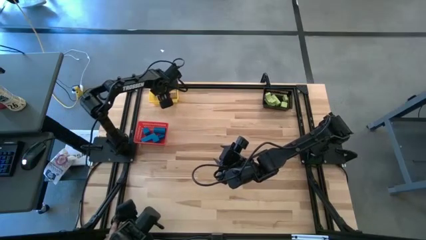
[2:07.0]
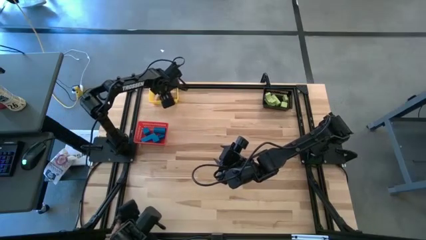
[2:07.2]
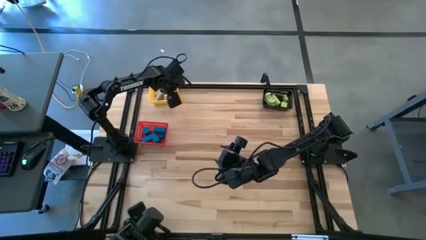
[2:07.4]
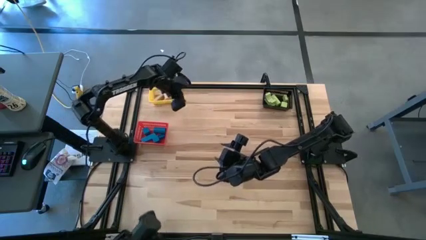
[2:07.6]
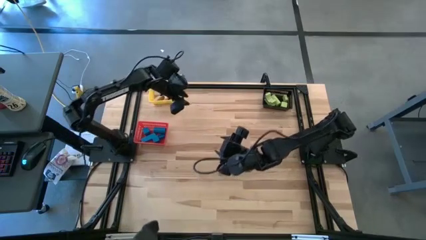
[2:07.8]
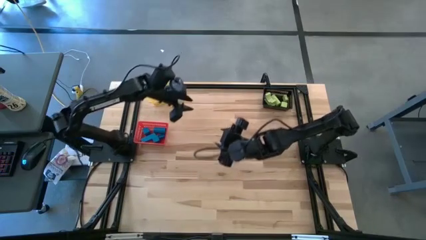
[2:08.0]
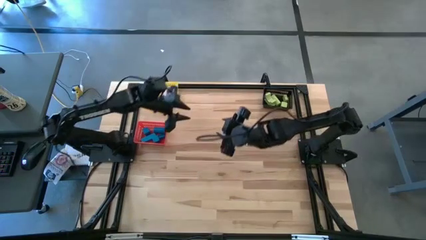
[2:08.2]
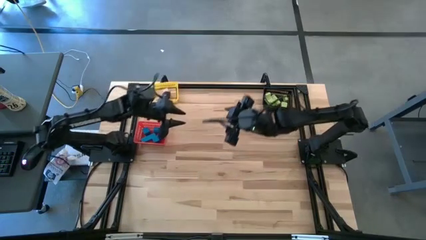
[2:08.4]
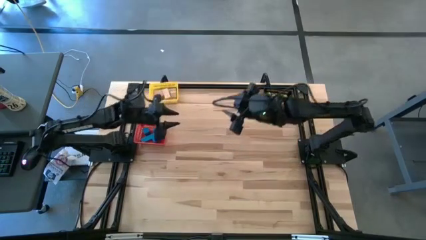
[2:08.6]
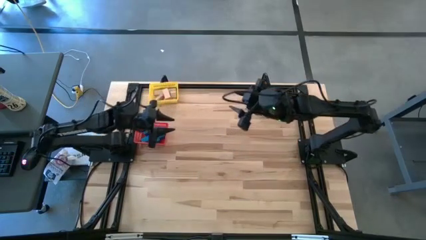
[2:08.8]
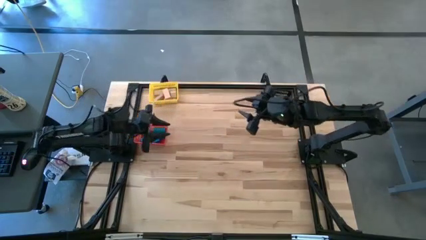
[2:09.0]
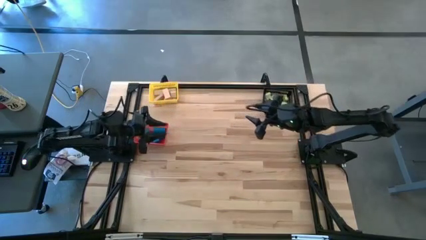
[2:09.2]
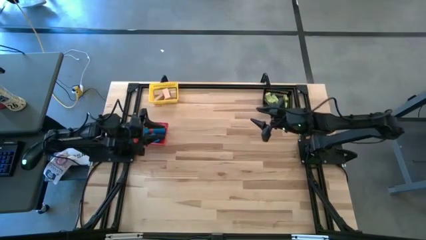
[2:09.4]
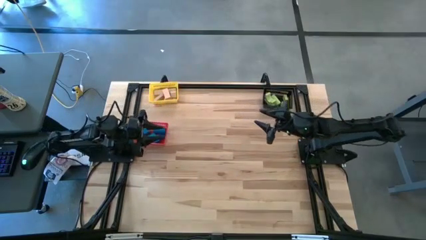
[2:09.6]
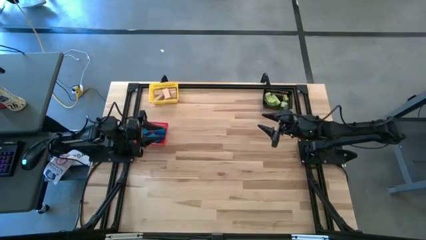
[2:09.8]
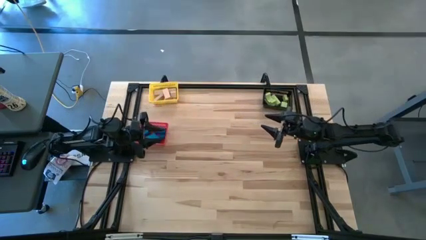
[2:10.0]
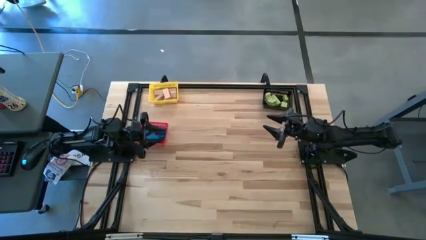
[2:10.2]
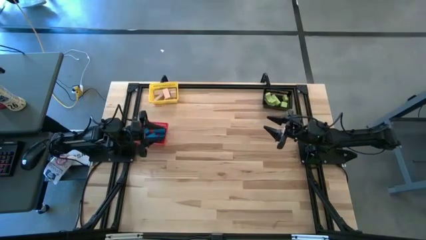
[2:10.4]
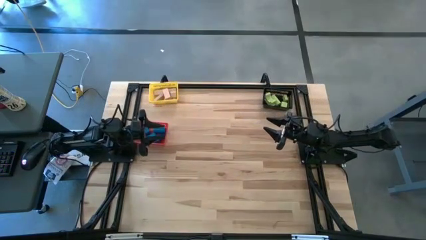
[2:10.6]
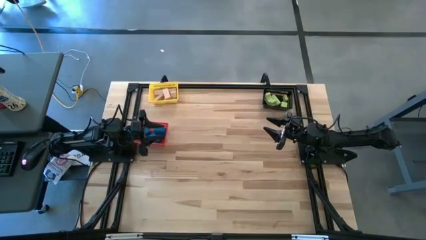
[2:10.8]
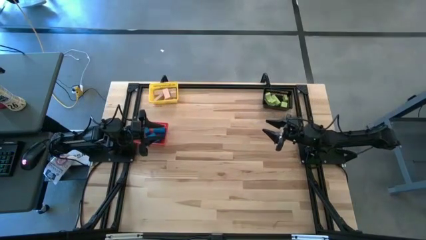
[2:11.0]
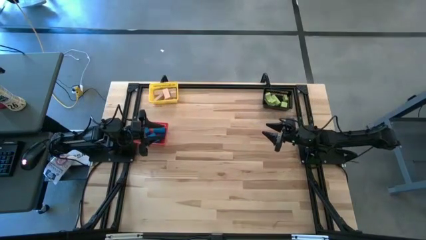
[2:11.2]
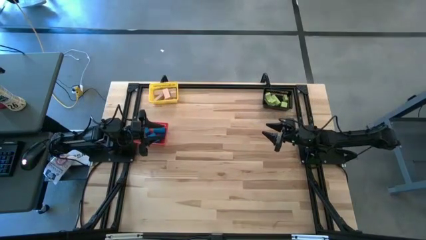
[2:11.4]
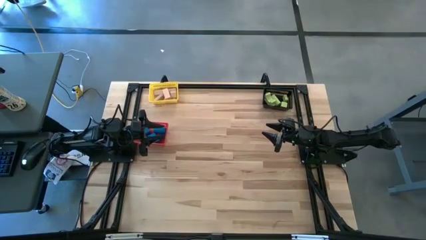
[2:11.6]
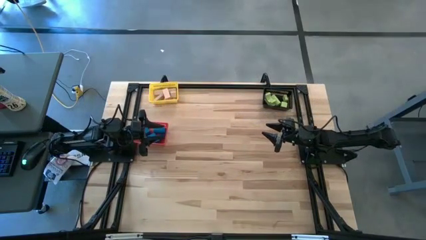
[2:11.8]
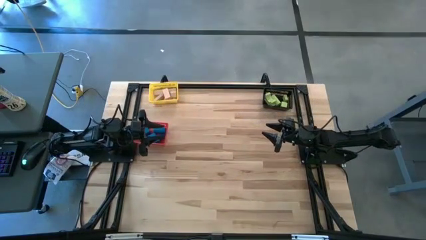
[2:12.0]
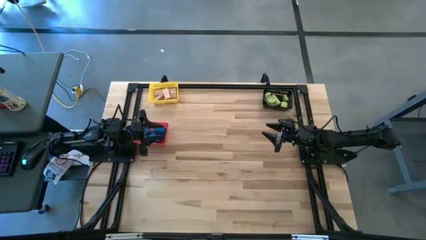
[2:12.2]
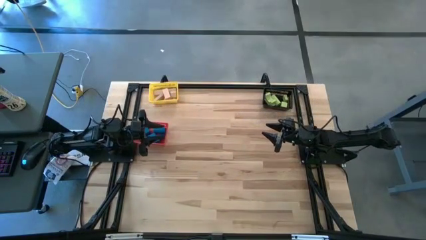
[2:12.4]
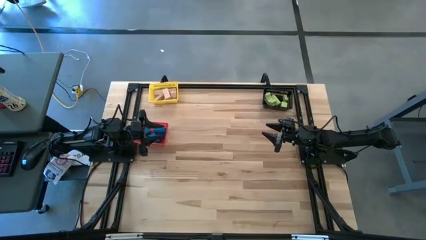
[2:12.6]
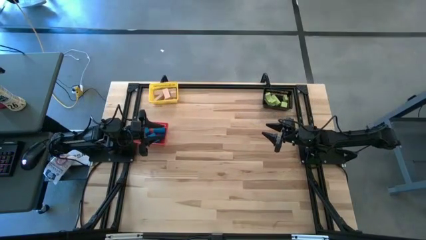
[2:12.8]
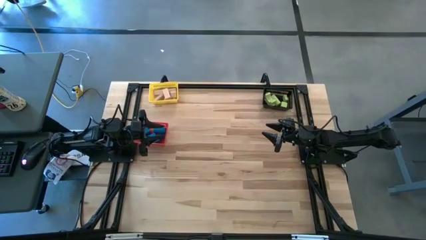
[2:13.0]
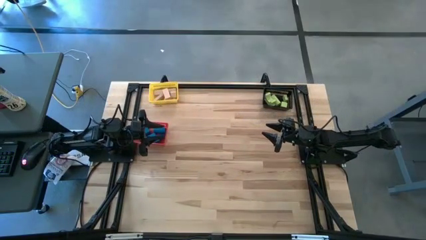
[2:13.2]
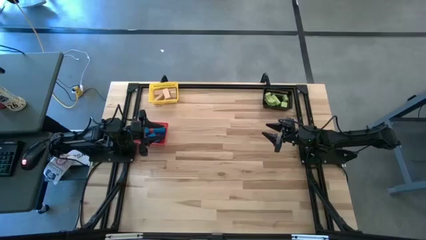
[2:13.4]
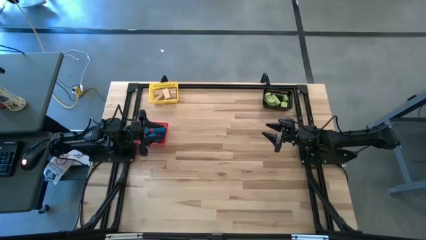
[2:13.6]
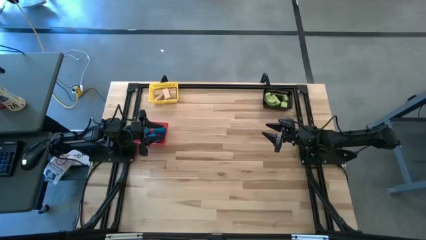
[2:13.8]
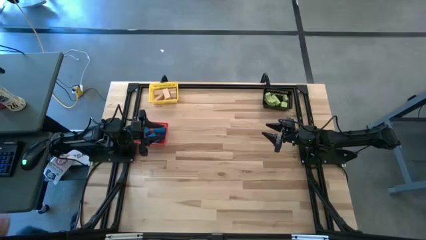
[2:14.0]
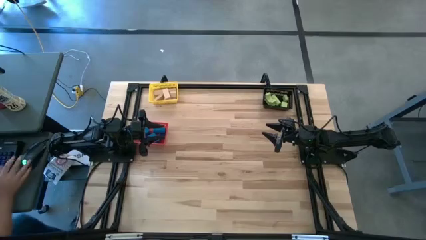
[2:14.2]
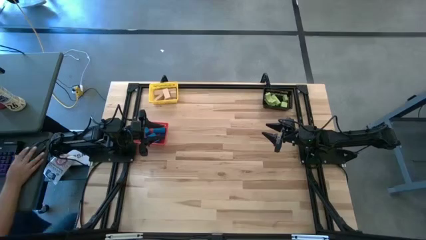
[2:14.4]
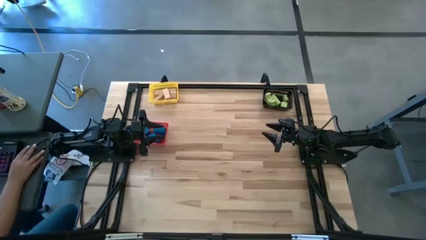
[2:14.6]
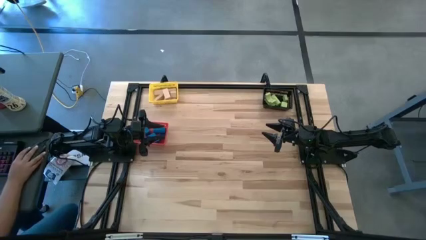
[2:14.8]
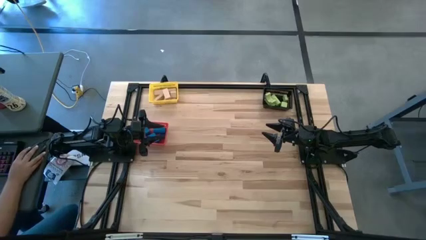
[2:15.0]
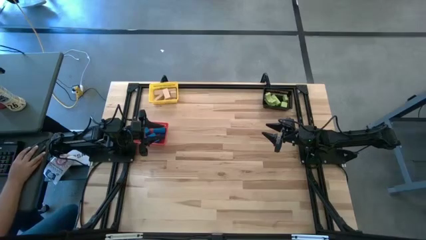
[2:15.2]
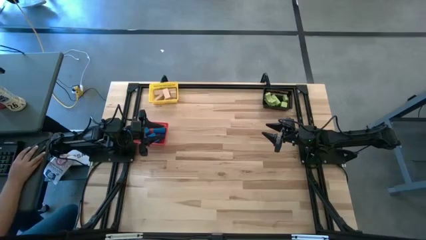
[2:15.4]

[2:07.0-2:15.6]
Task: Sort & place blocks by color
Return to Home Position

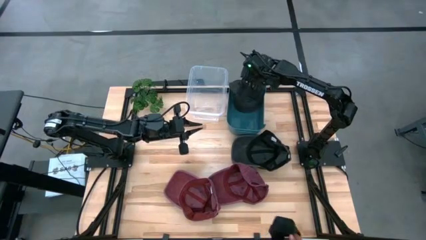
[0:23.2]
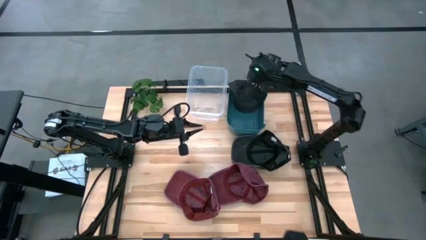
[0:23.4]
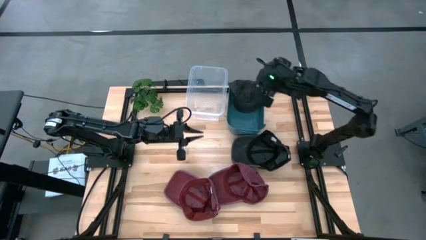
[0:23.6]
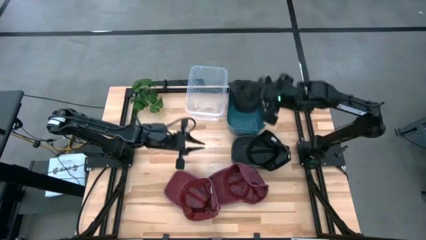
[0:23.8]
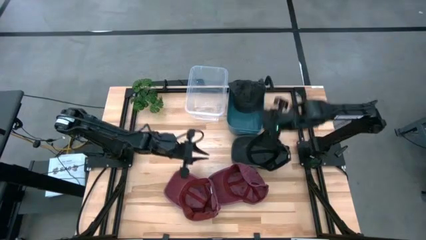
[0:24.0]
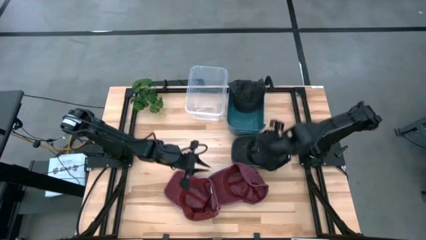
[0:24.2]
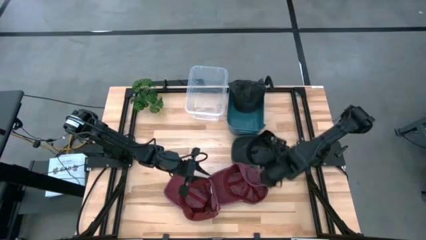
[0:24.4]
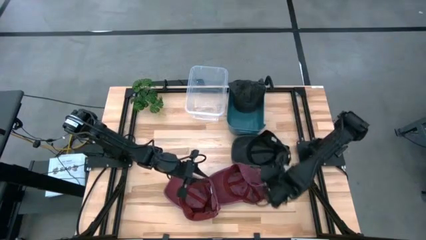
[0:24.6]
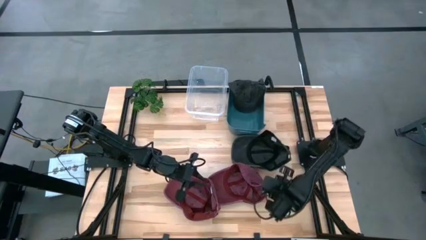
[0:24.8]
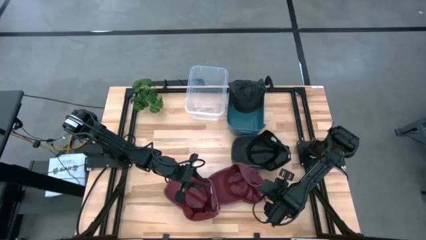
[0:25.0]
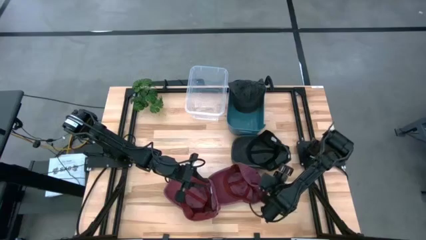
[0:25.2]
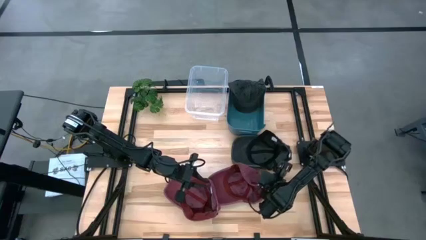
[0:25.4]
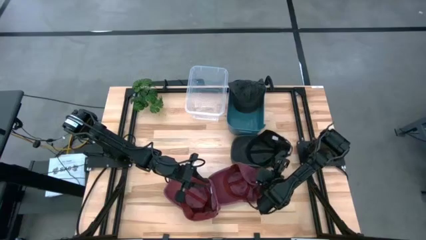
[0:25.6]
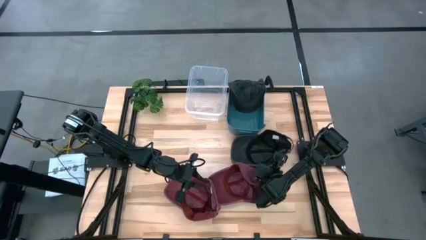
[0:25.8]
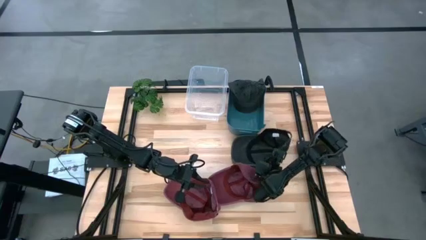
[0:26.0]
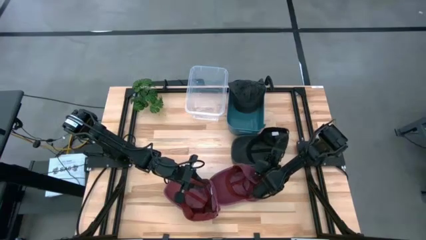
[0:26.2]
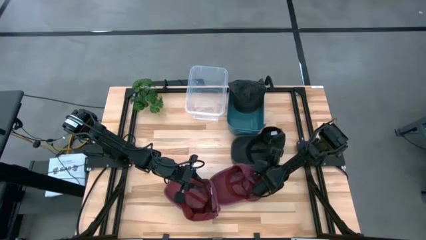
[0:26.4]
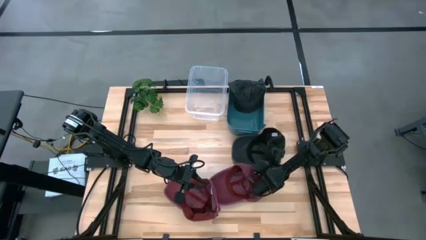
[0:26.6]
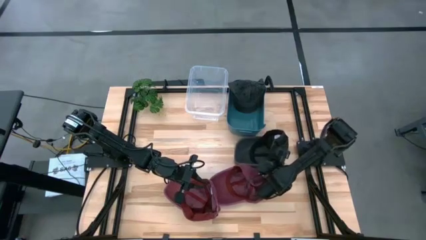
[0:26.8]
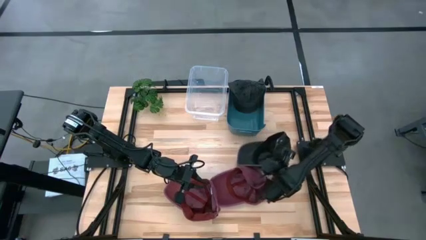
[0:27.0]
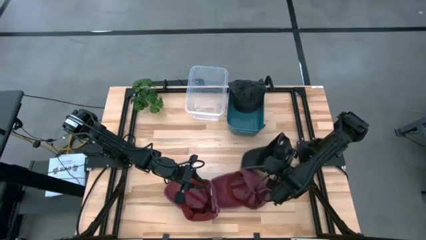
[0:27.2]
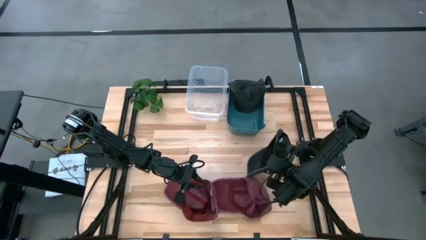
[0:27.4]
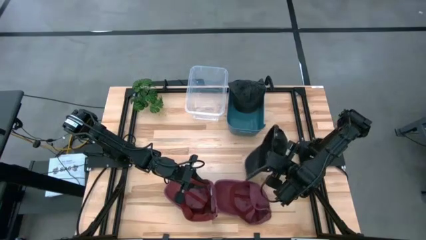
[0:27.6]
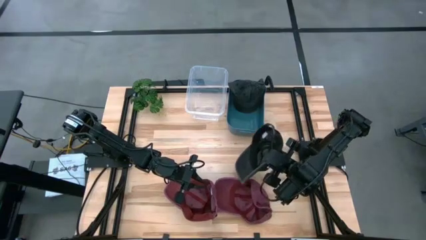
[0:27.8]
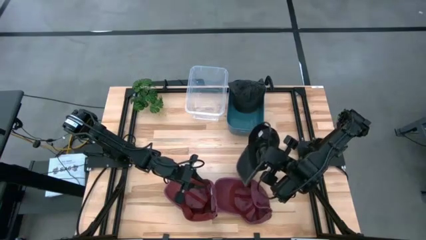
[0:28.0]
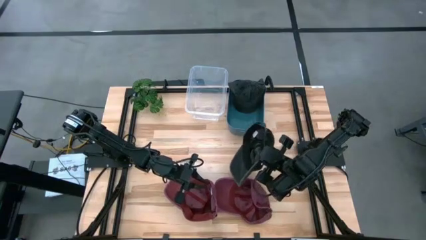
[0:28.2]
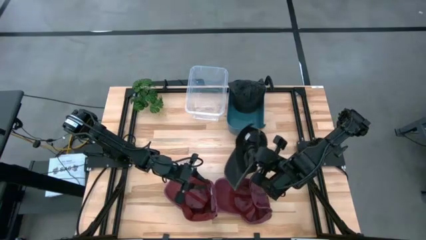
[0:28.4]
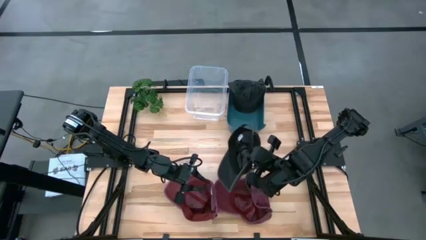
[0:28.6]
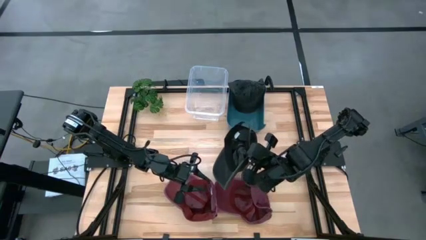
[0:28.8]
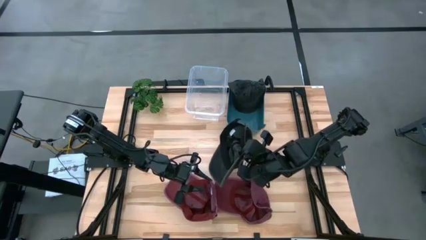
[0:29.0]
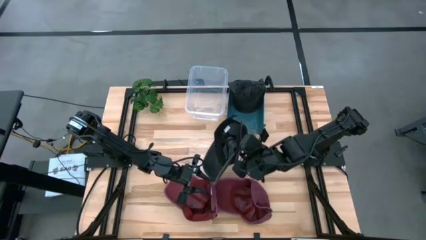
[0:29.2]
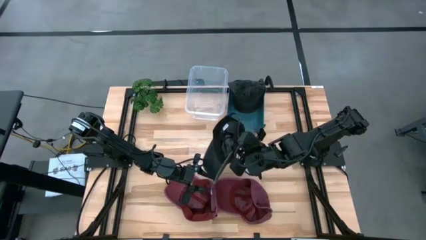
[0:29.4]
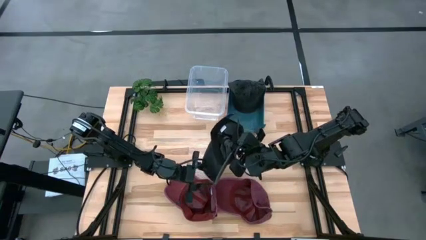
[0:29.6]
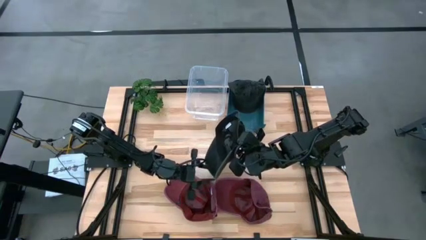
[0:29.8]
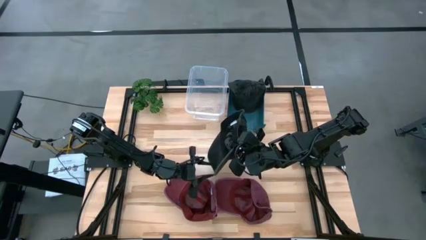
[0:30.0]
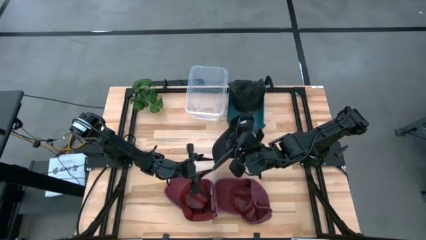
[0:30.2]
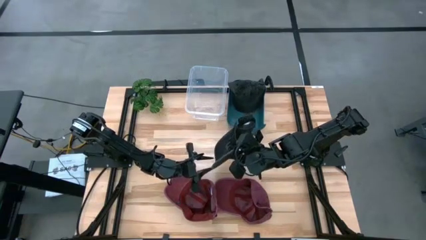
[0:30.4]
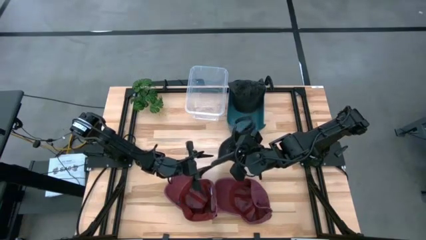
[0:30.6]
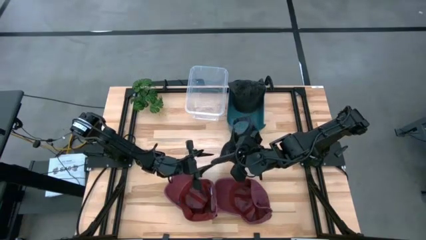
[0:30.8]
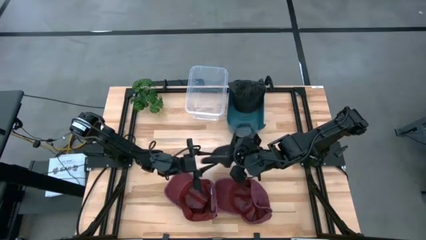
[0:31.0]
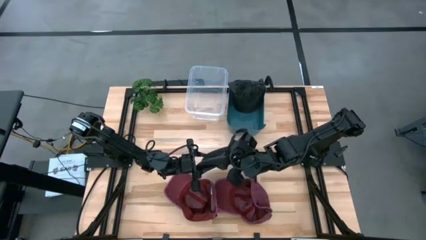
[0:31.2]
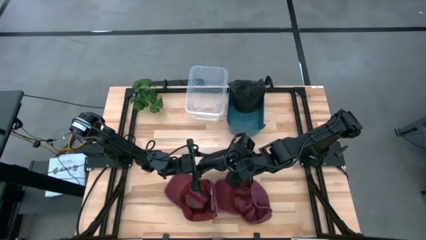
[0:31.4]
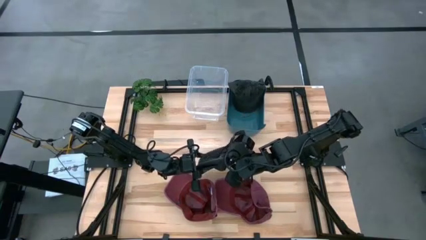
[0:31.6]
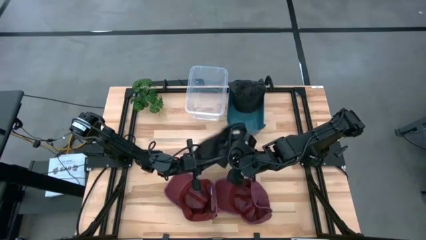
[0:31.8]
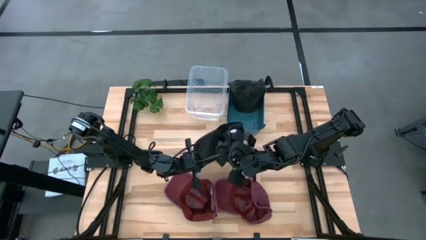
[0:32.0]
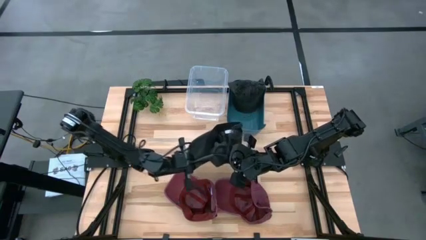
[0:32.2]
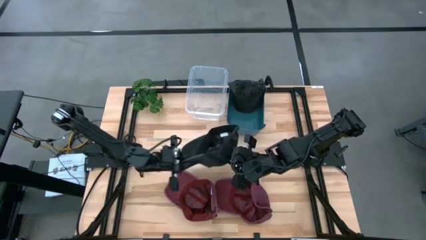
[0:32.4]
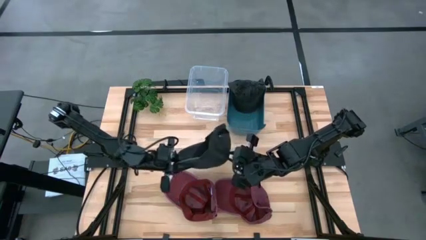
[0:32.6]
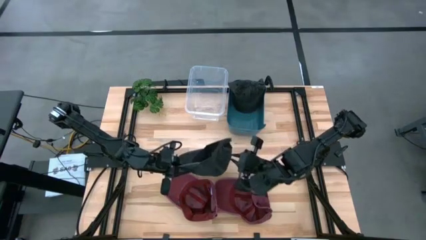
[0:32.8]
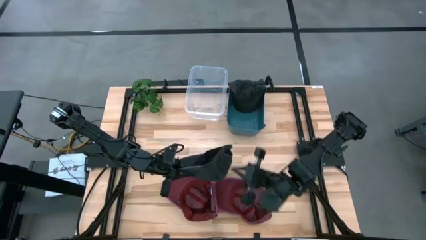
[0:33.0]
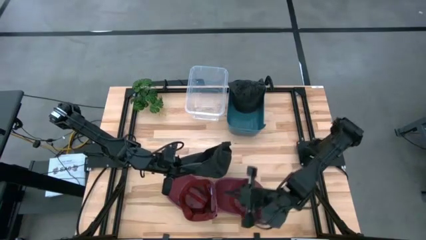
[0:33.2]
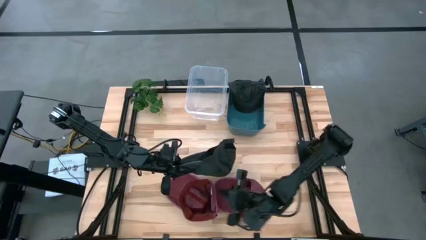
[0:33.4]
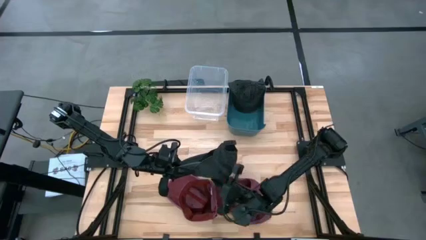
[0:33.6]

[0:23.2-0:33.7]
Task: Pick & Place hat
Put the black cap into the blue bin
